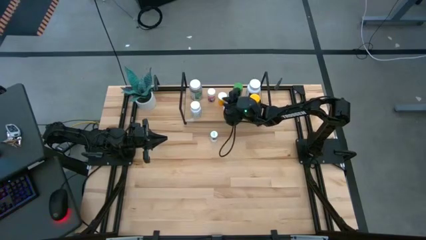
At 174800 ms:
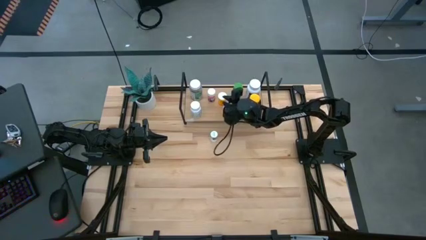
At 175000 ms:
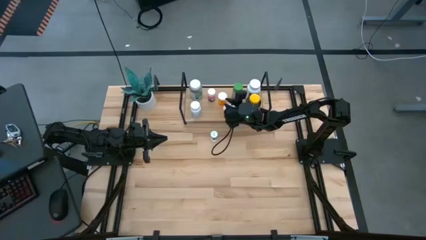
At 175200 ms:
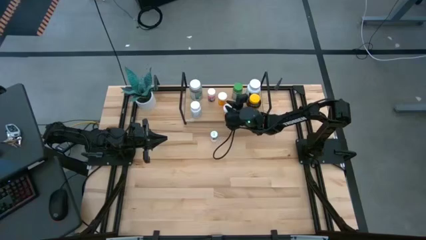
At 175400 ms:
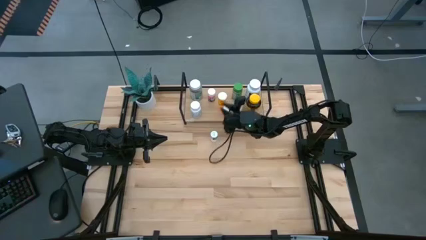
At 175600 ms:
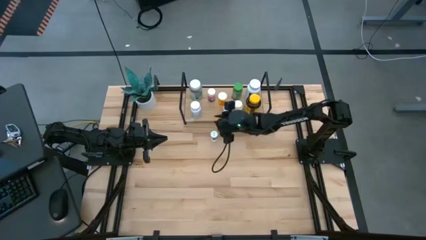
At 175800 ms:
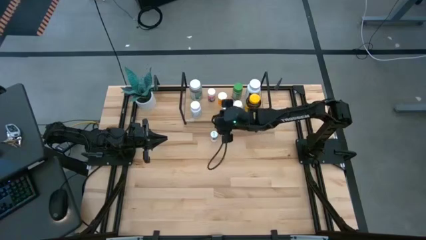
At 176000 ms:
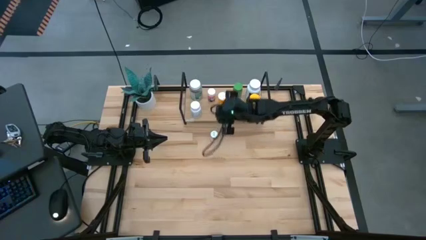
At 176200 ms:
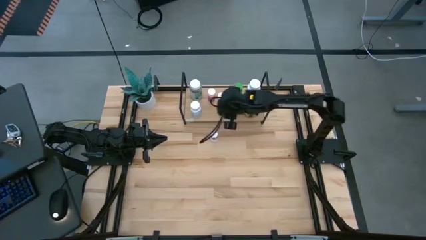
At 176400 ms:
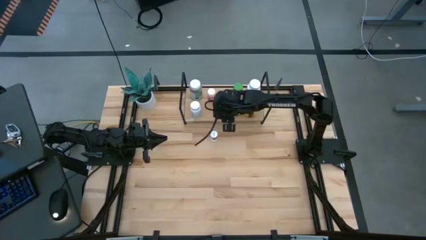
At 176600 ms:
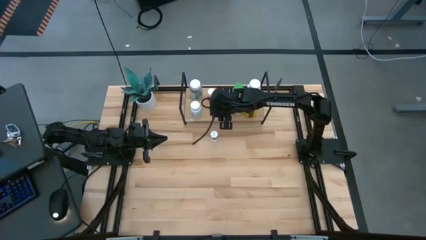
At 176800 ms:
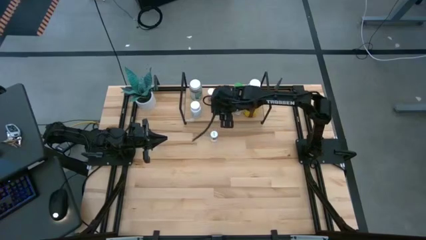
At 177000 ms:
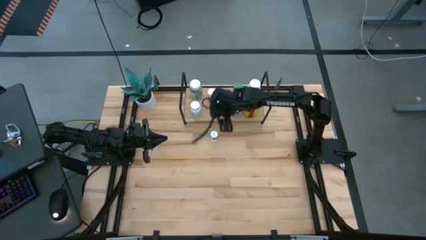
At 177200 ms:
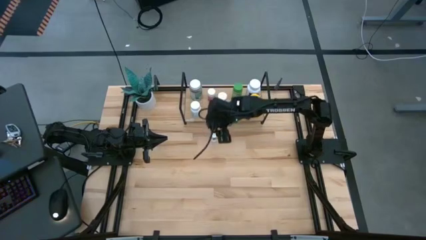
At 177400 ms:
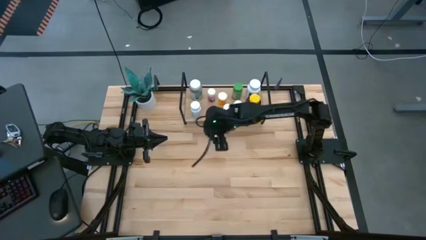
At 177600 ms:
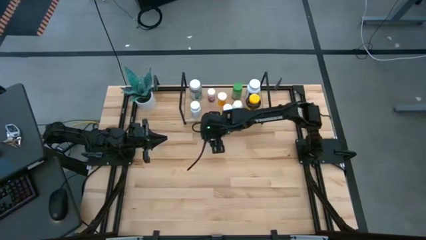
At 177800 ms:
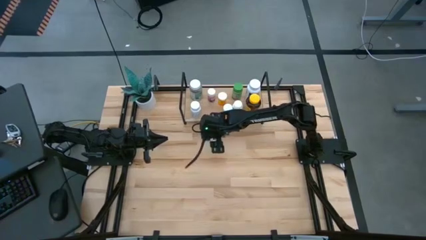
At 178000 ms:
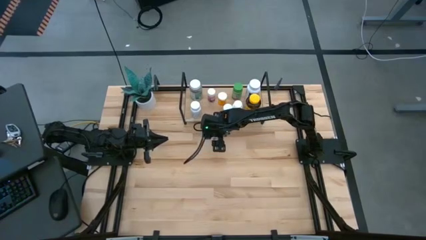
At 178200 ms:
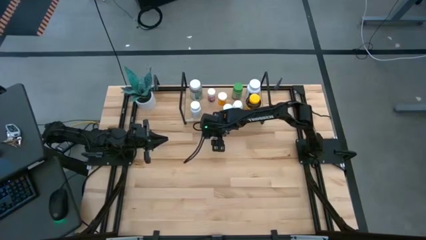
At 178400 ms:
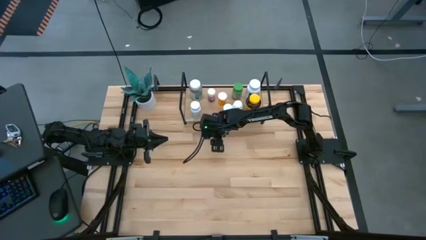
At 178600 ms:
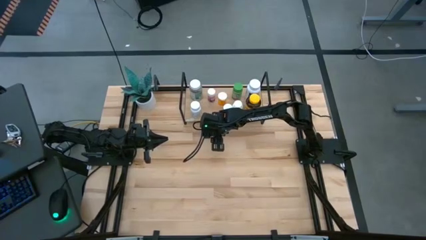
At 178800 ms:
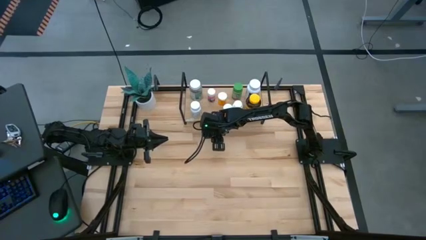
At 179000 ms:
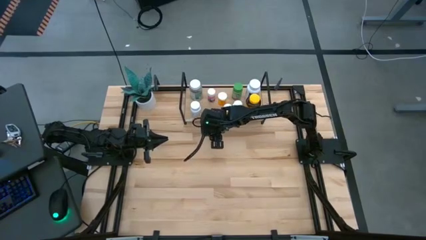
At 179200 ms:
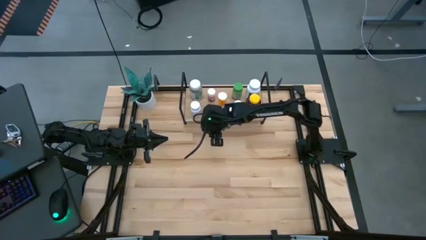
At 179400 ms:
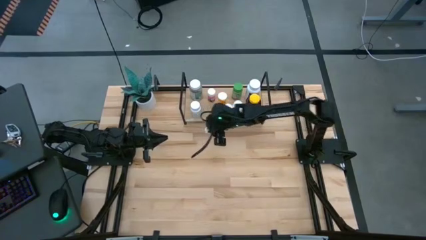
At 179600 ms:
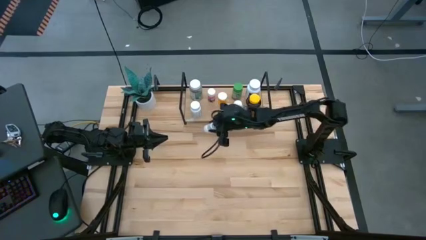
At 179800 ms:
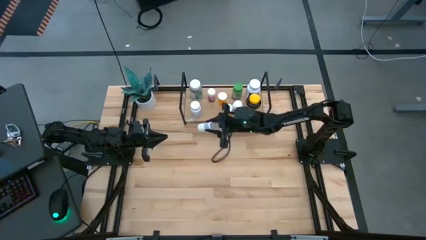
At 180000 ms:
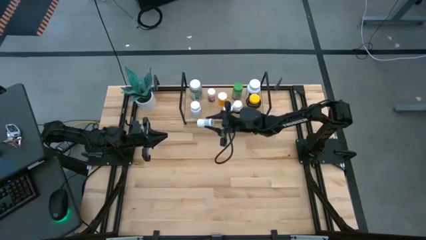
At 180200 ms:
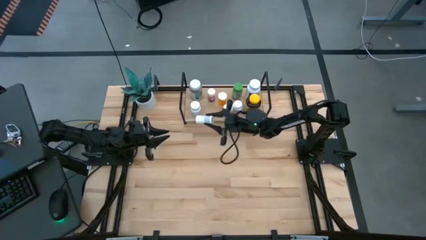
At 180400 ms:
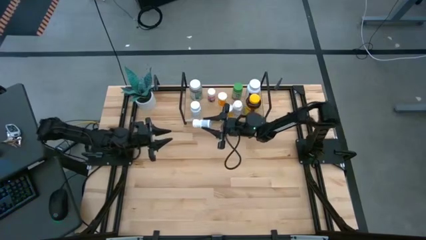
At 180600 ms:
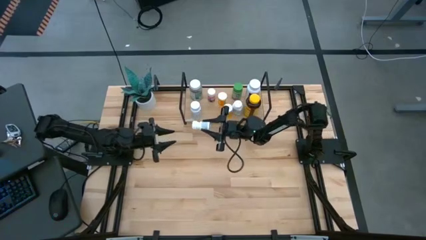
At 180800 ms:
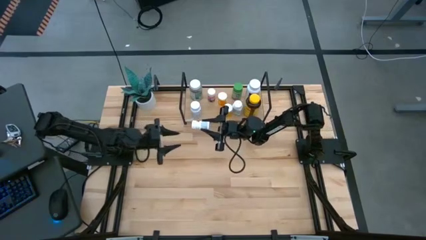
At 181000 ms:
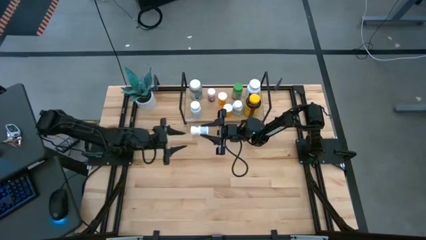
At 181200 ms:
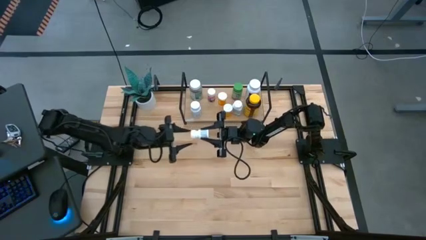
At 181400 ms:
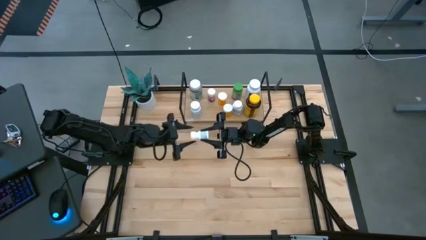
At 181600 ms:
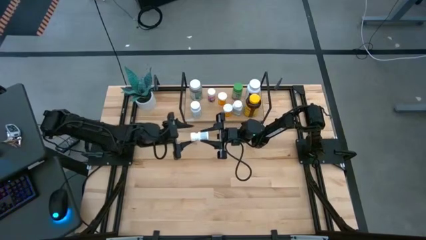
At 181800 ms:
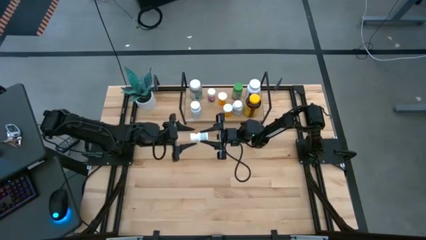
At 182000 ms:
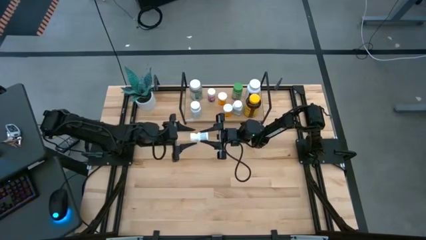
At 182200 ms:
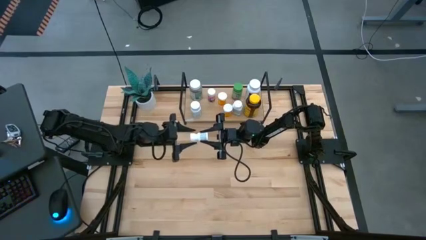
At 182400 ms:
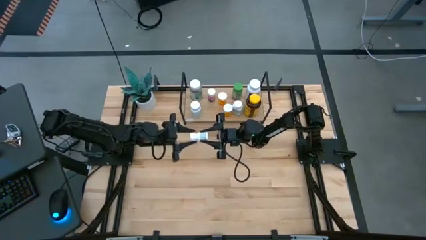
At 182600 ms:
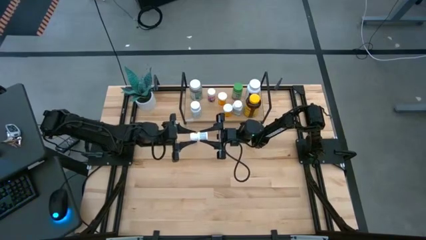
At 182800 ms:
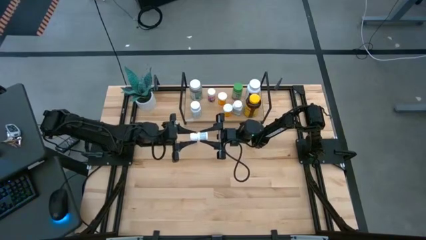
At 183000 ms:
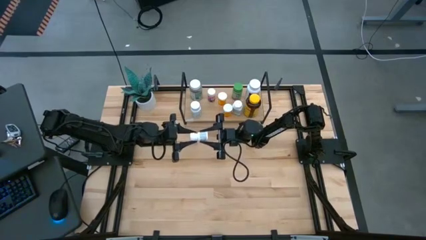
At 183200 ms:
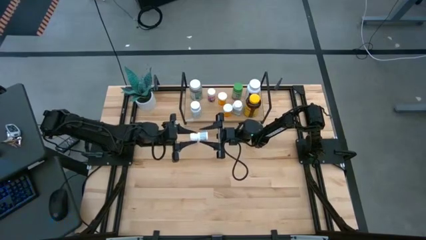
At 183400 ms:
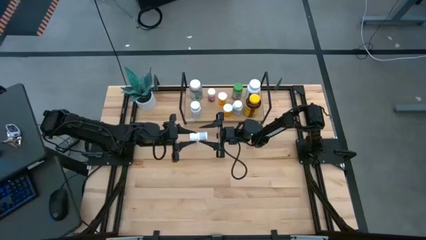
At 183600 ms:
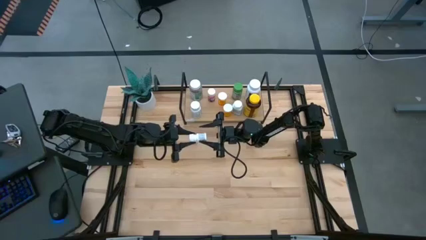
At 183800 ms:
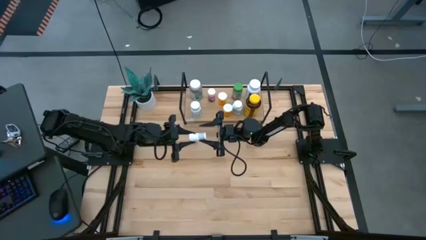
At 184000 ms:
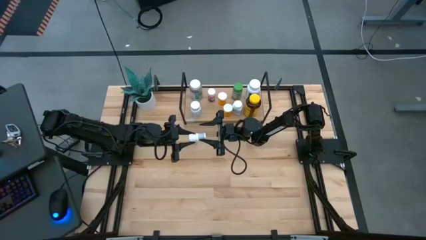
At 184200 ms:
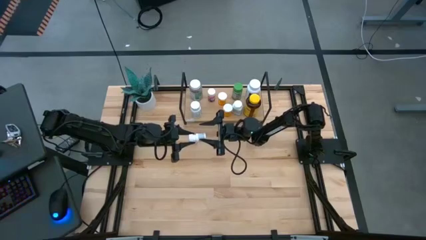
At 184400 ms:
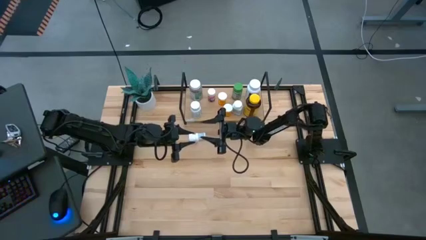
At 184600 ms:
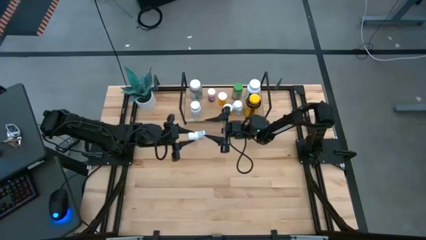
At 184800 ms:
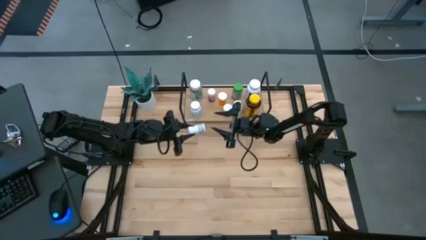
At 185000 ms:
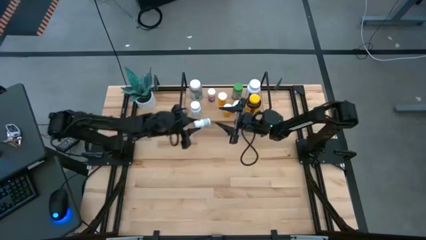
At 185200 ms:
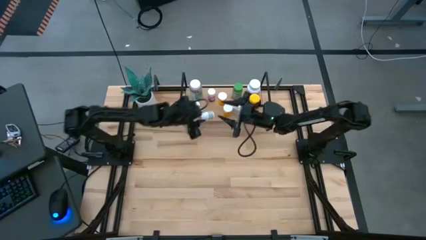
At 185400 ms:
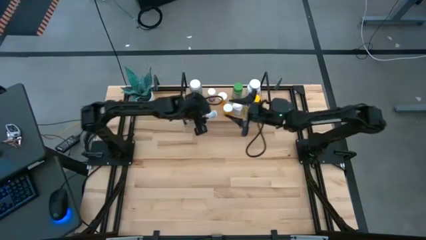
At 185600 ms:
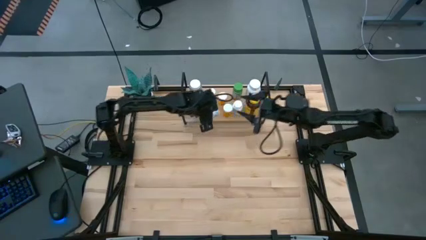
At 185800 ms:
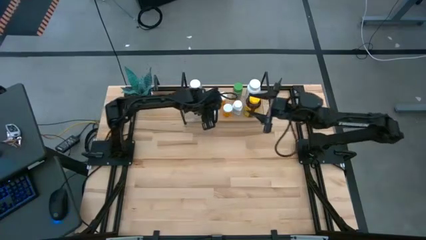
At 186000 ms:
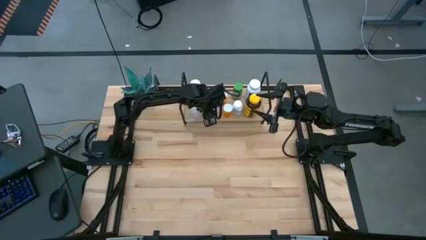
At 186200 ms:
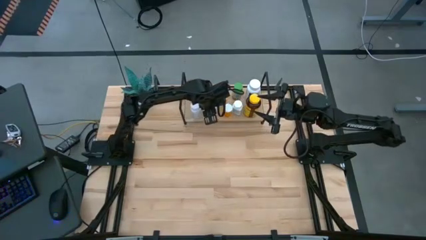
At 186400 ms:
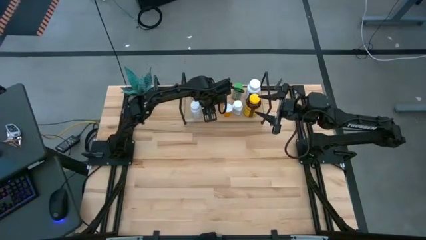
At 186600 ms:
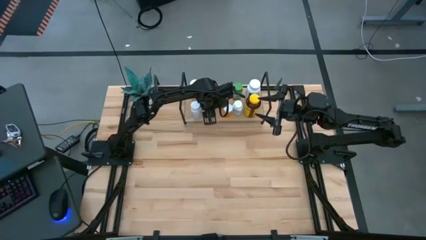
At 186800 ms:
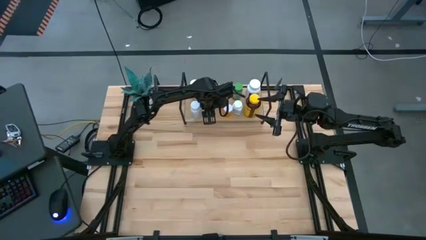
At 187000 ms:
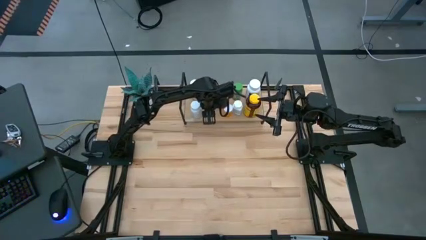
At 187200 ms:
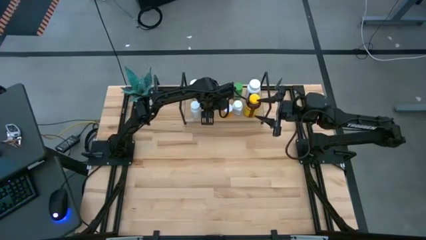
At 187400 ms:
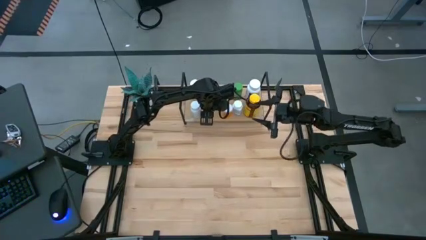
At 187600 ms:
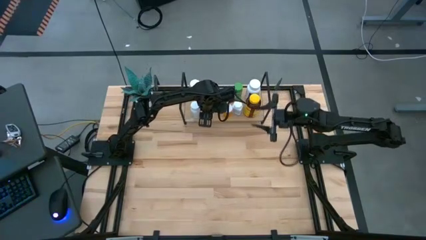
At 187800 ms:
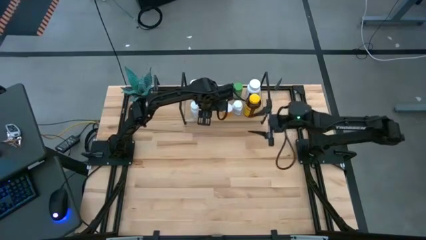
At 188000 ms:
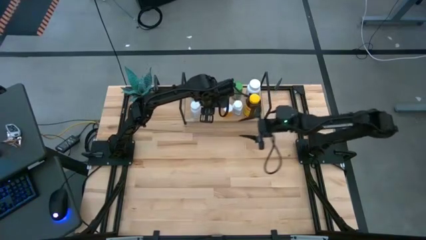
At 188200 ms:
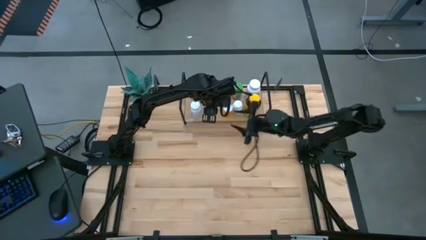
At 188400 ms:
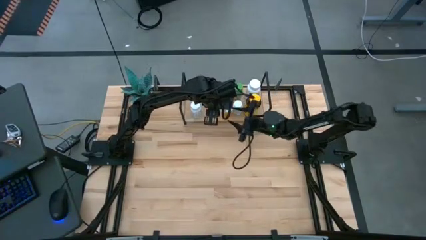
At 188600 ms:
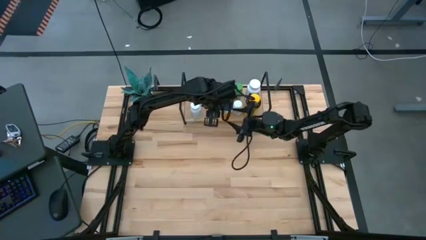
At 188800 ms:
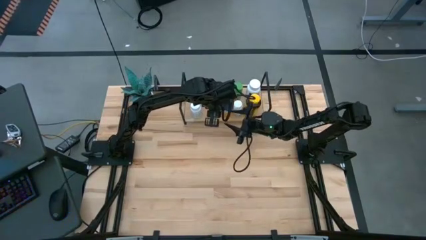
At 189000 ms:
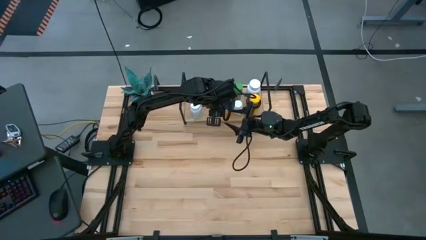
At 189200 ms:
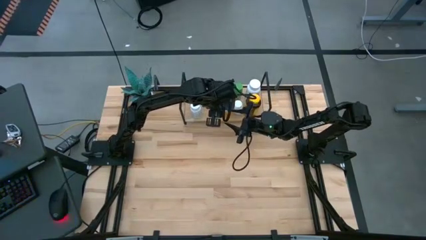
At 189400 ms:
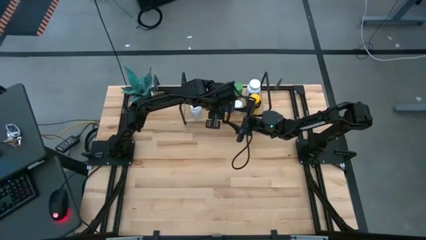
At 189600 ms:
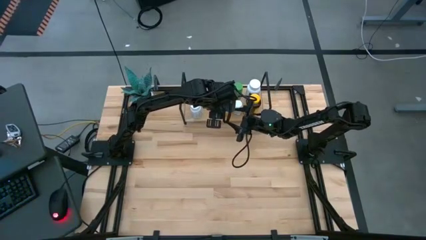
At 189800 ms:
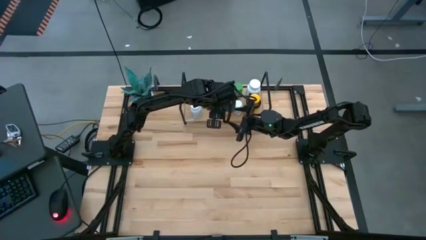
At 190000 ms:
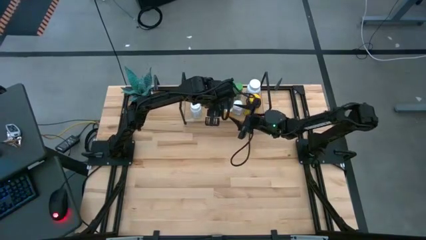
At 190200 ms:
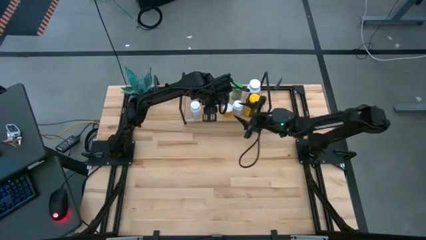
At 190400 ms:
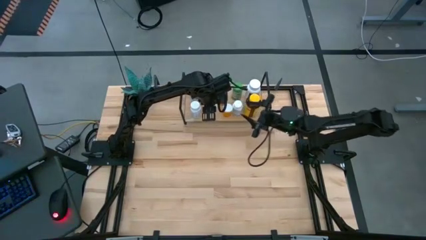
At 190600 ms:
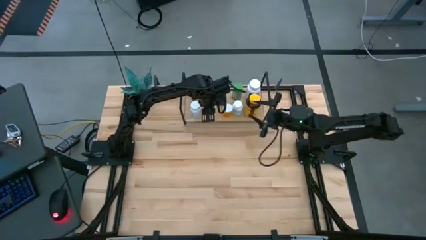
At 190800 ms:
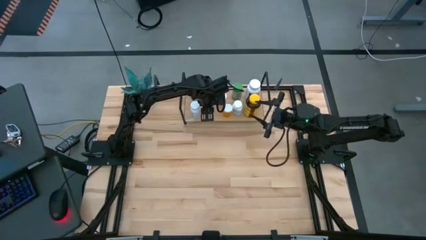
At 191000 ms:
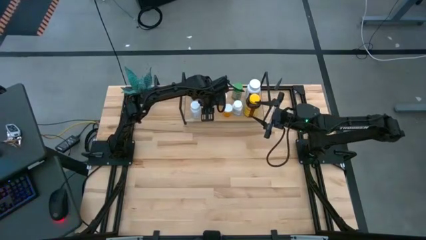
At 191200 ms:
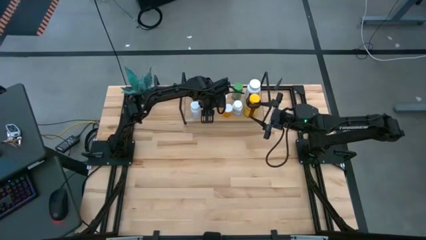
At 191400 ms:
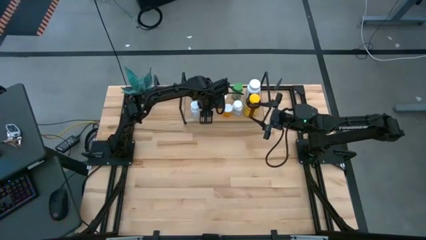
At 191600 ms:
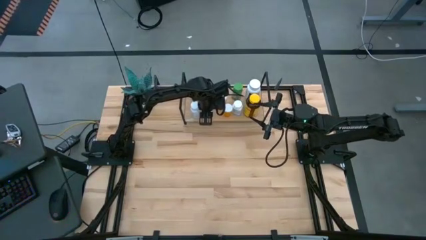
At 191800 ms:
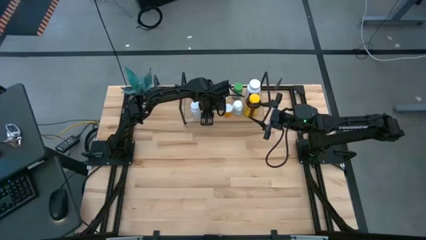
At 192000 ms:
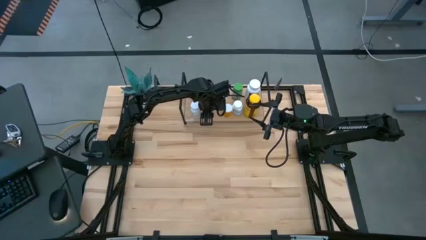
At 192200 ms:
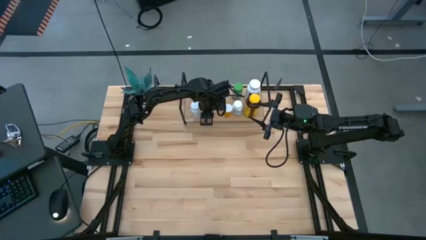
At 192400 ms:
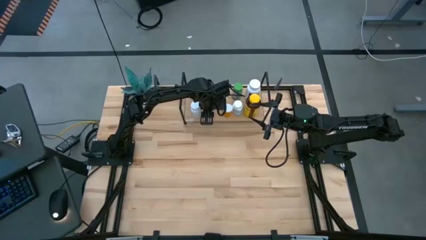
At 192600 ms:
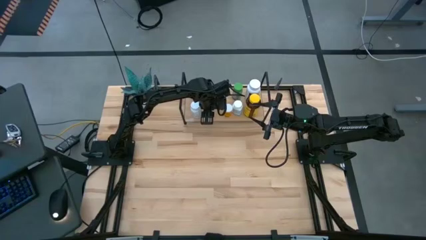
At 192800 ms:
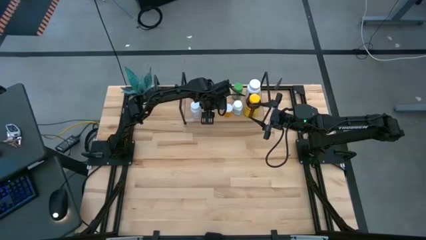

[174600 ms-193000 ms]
Task: Pick and place medicine bottles onto shelf by color
Put the black white medicine on the shelf
